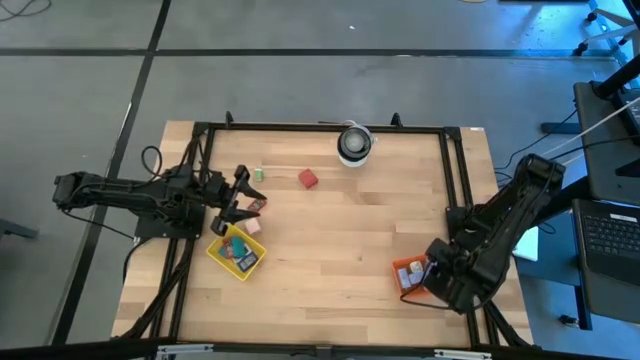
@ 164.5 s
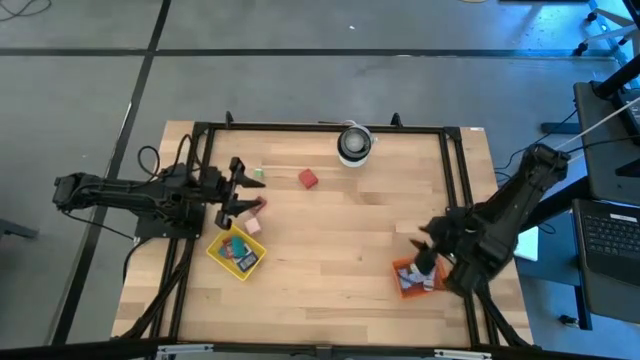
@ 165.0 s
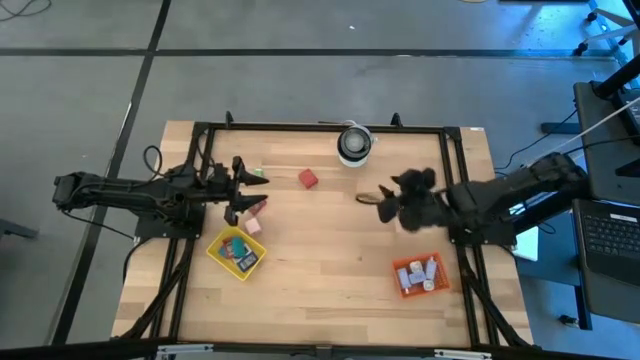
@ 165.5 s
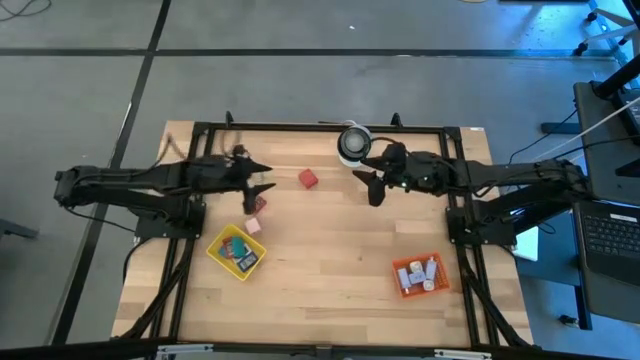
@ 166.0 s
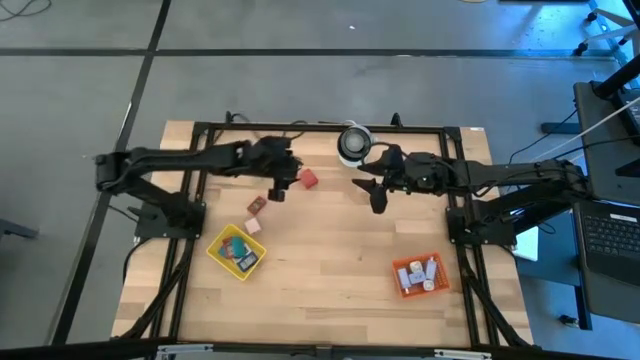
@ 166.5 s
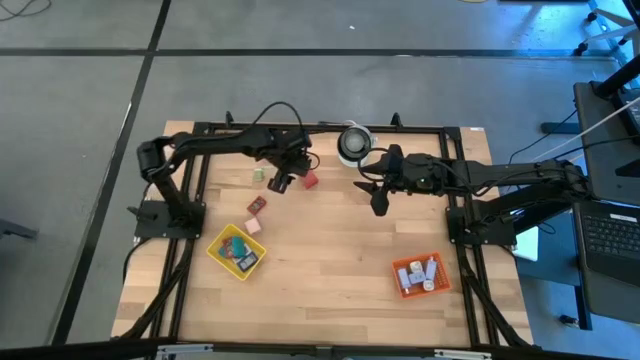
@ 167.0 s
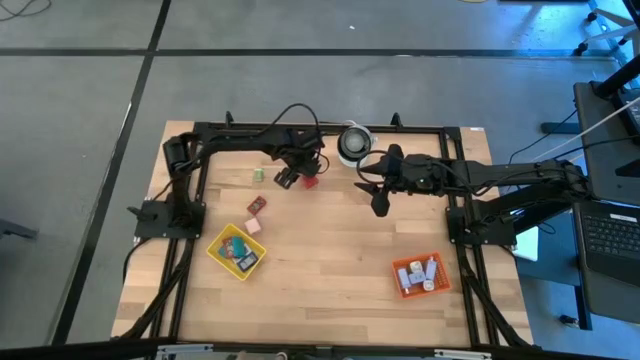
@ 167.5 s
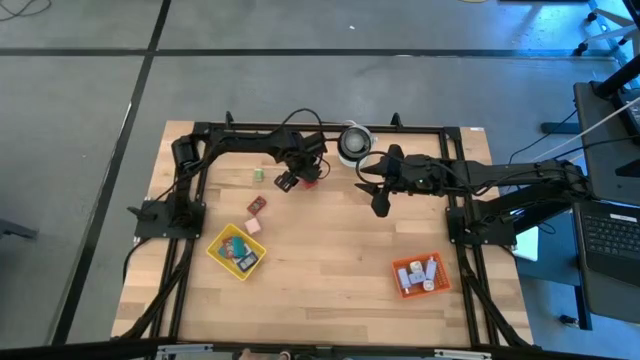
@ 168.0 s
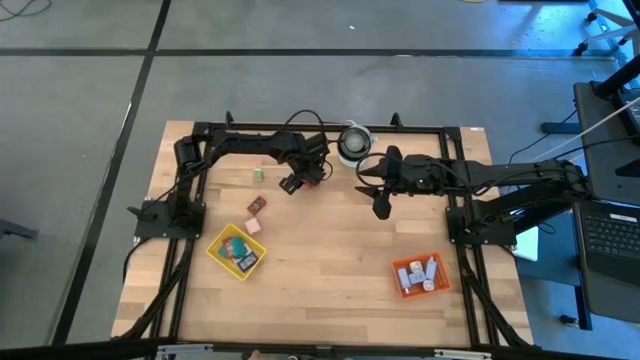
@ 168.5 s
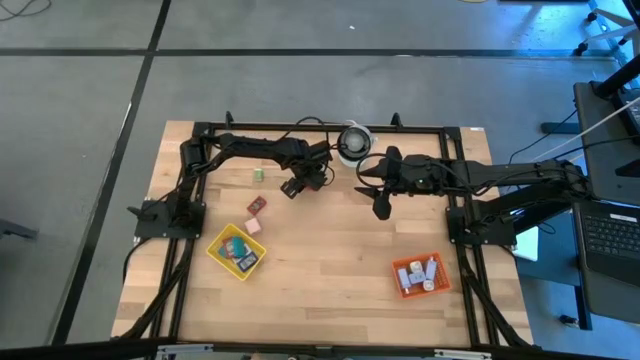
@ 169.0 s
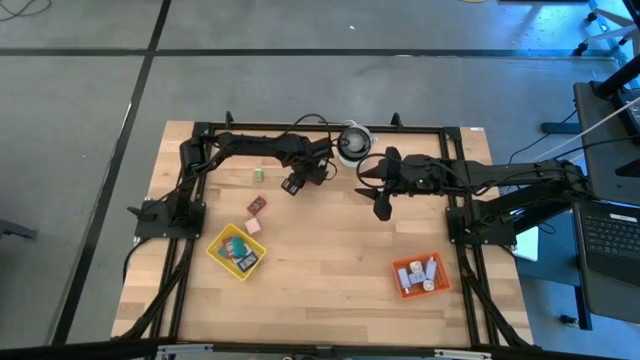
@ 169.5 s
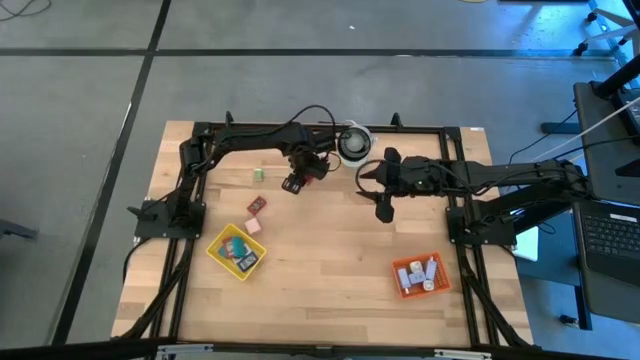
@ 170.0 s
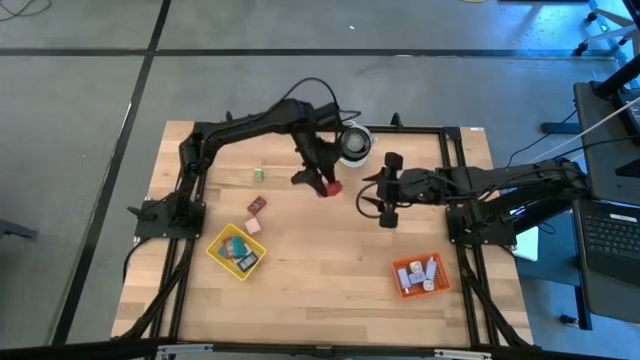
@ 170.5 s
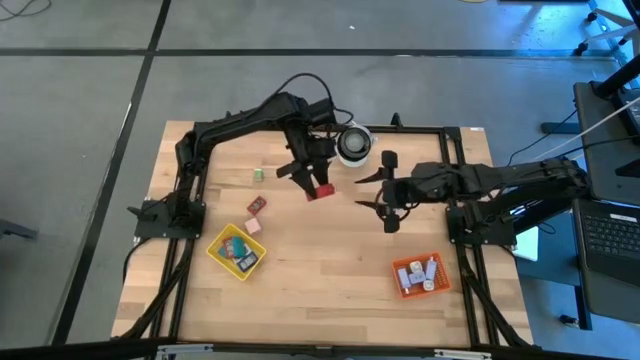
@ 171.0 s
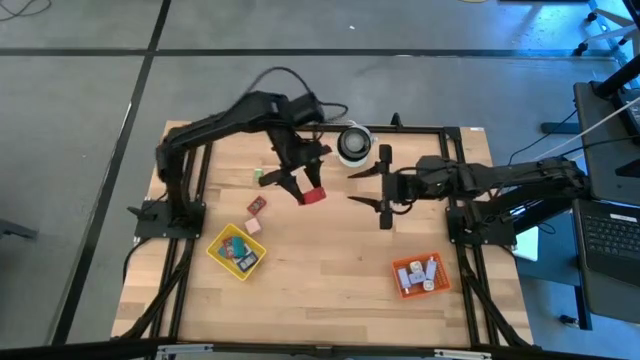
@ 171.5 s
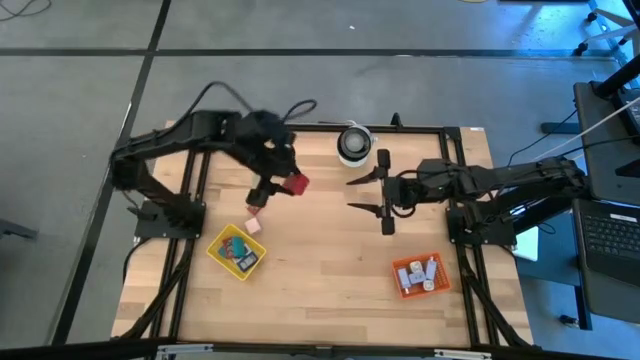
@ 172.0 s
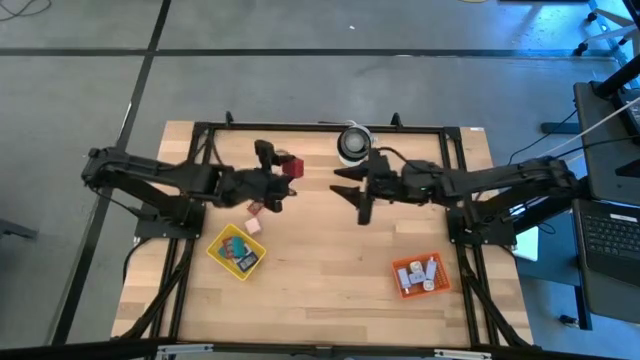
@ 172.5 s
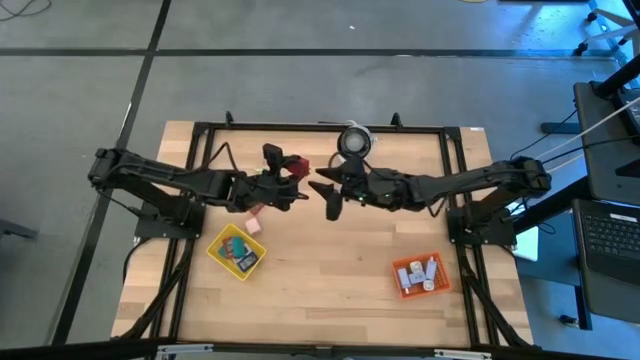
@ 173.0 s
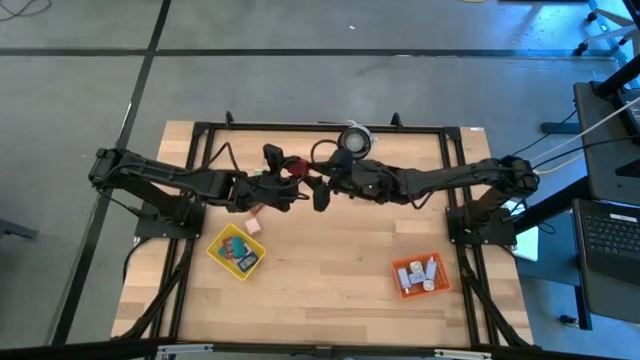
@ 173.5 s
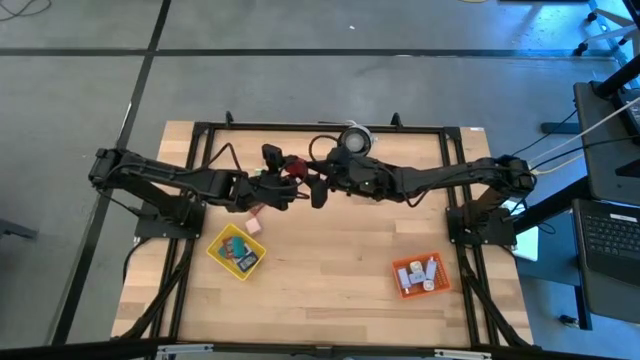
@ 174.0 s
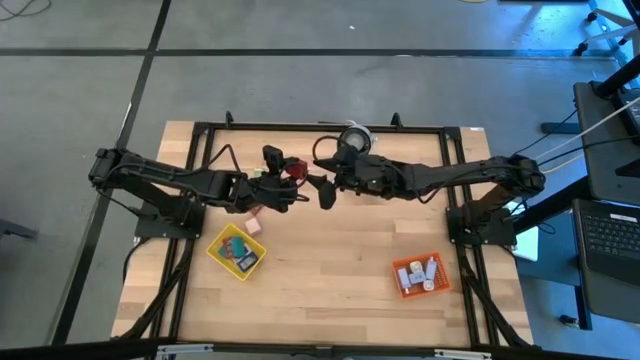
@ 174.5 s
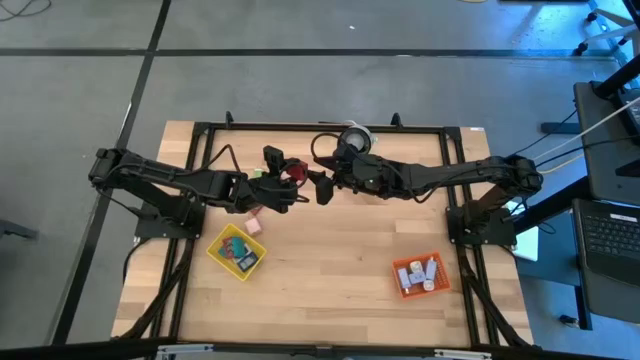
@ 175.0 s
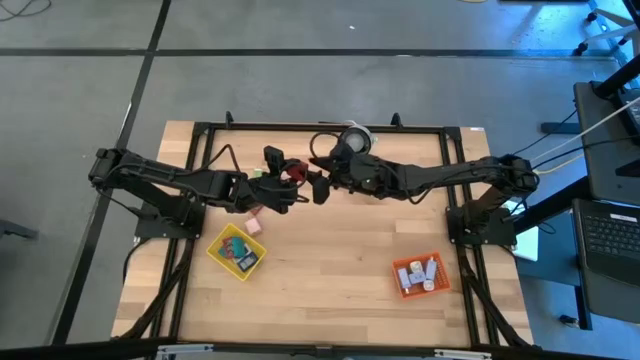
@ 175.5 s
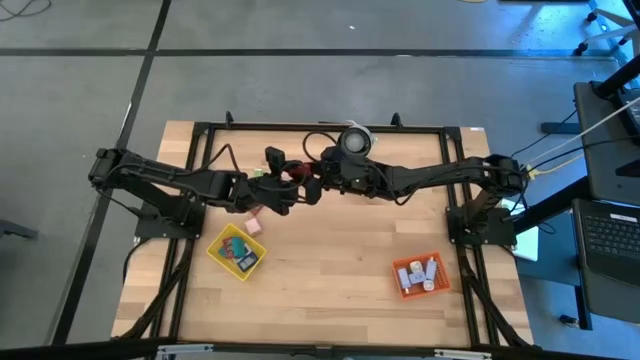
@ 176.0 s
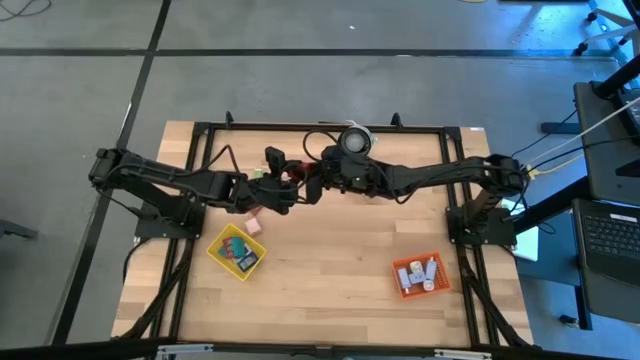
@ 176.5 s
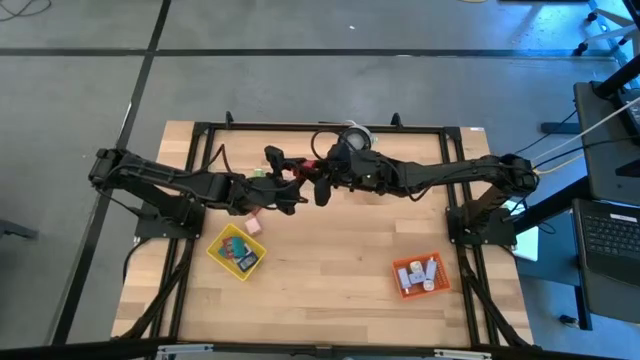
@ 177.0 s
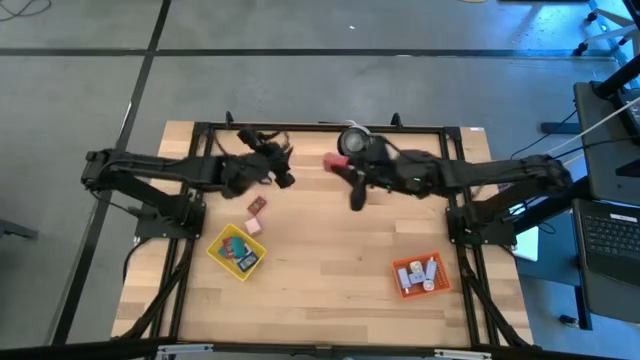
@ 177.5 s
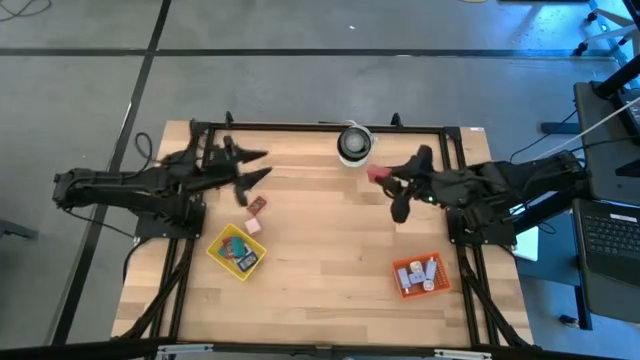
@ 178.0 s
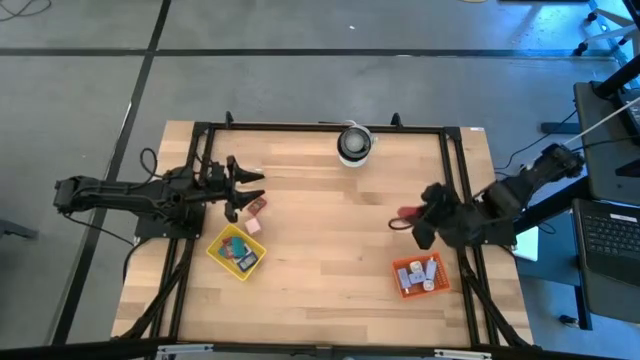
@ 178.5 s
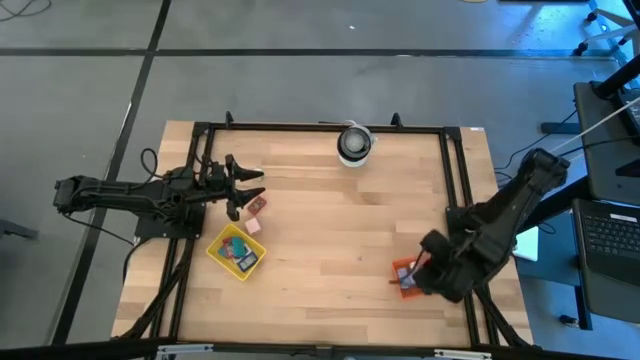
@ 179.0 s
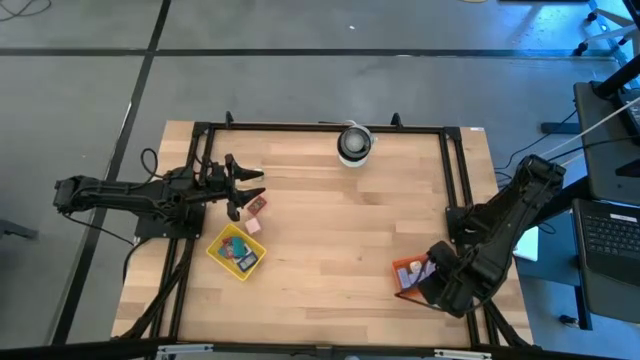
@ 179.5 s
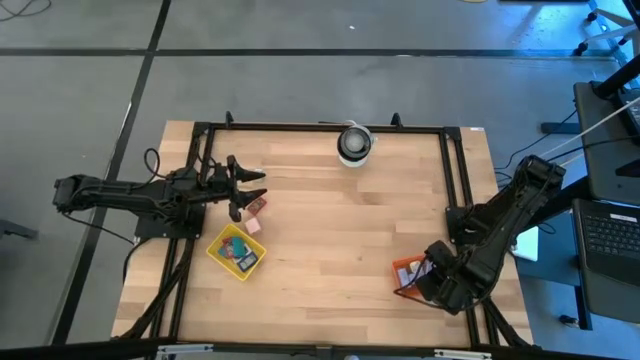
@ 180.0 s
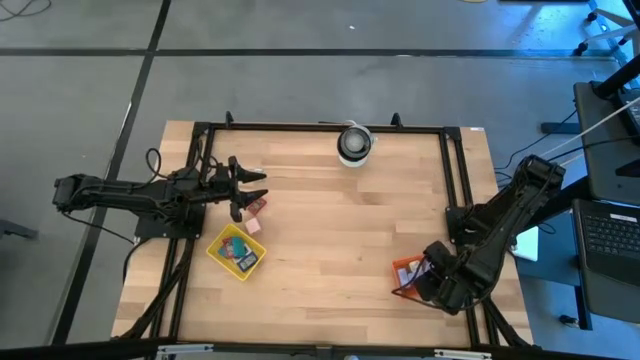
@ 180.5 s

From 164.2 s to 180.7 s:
Task: Pick & Place Office items
Put the red charger adapter into the orange bin

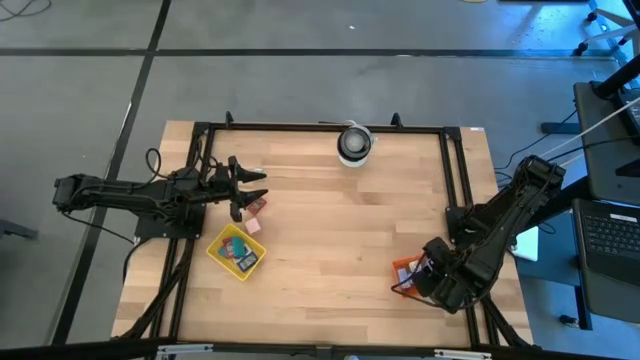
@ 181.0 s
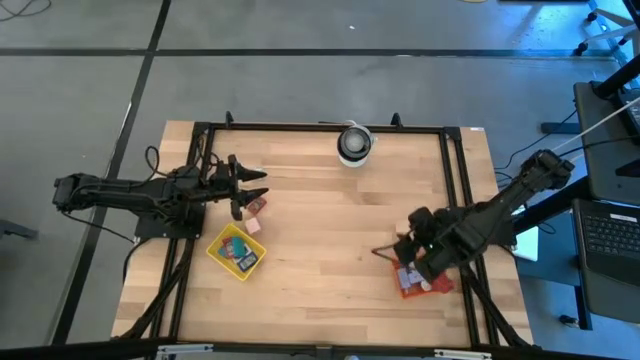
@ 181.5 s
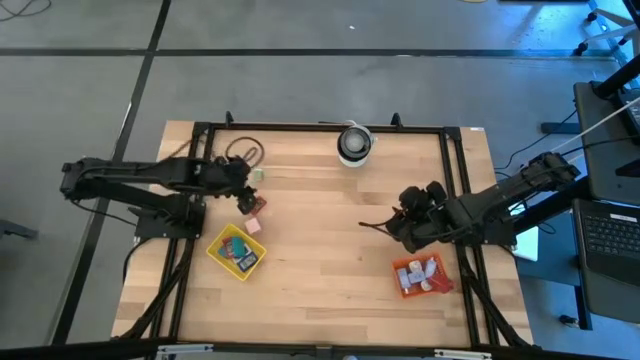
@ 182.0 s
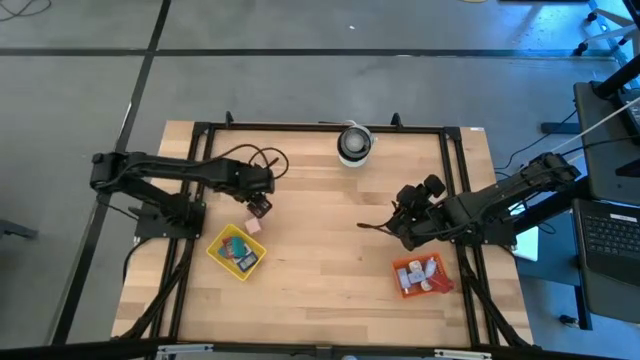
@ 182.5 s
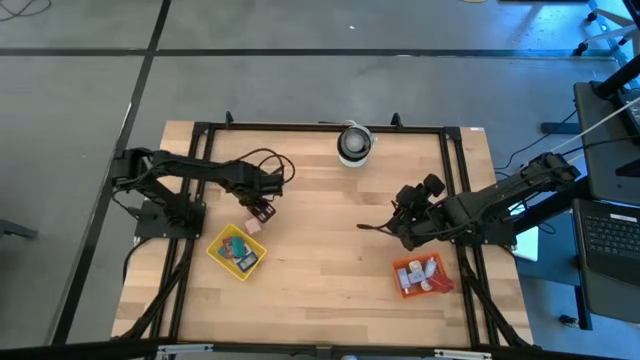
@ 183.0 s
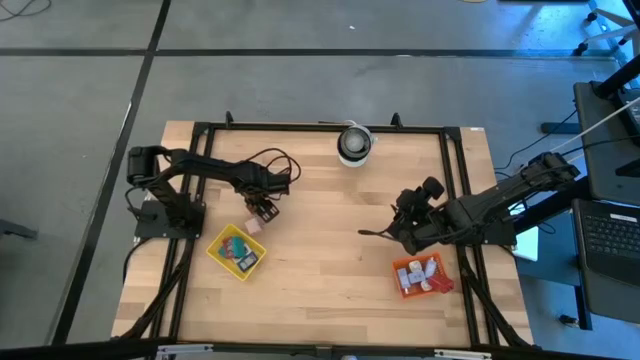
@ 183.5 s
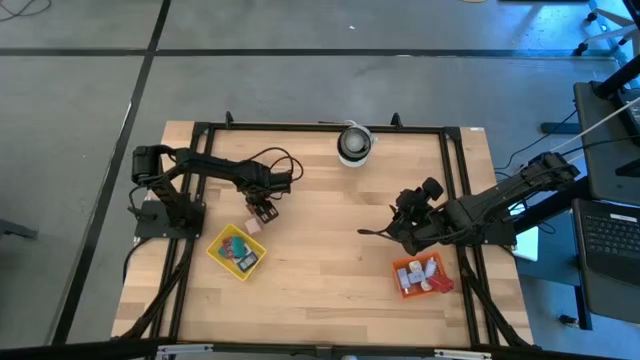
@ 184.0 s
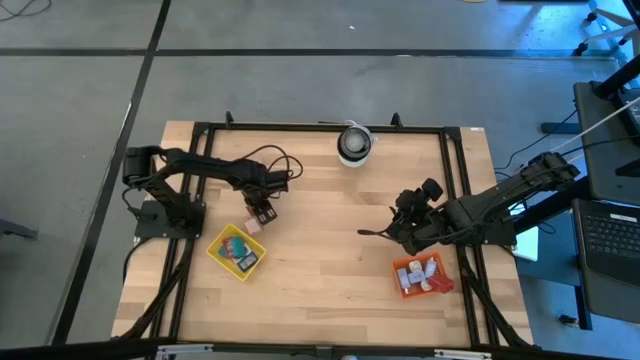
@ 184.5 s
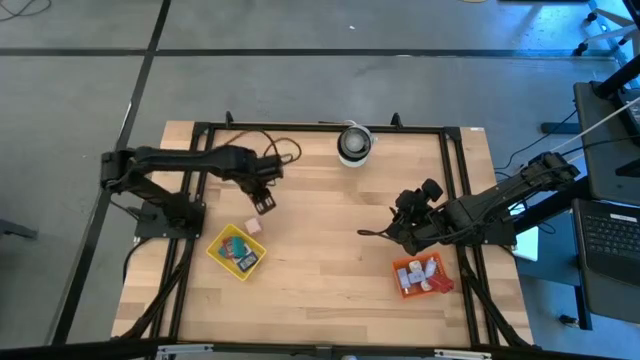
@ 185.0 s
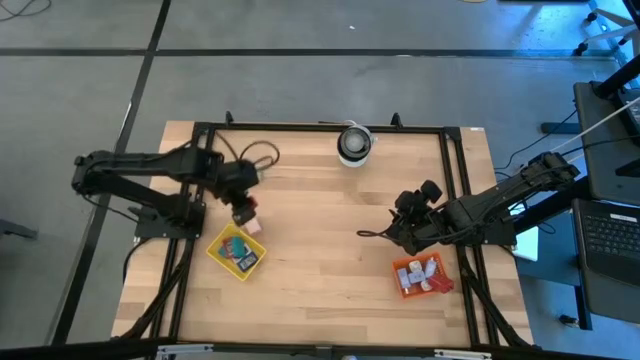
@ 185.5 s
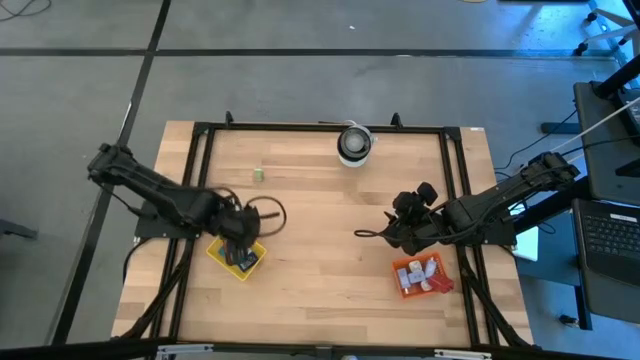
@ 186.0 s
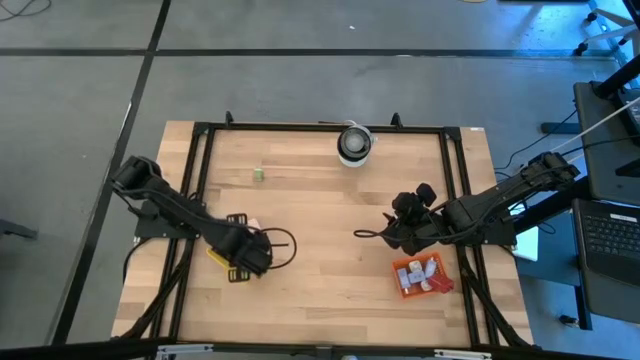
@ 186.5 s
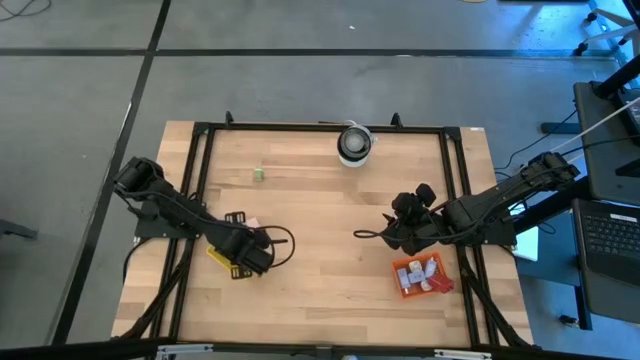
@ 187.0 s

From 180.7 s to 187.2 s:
Put the red digital timer into the yellow bin
